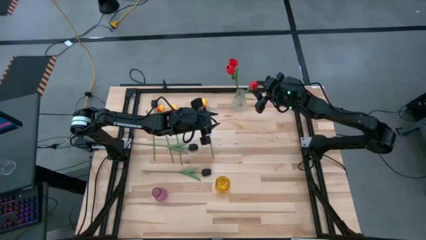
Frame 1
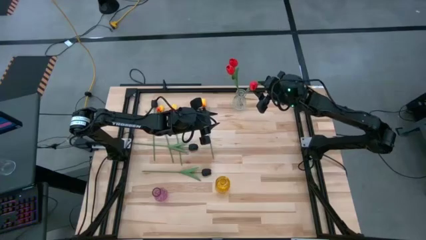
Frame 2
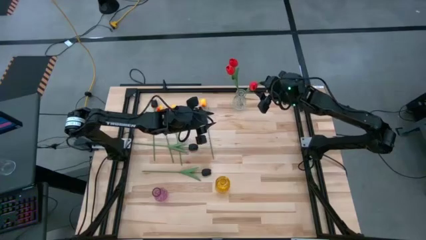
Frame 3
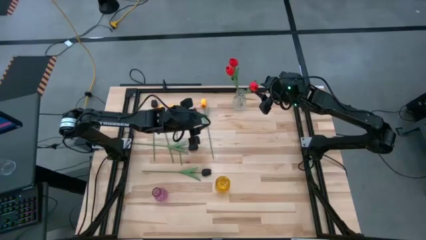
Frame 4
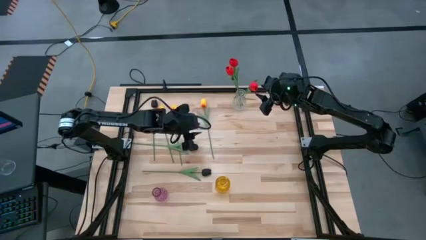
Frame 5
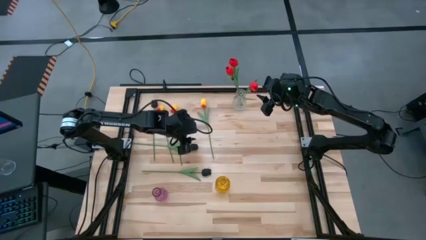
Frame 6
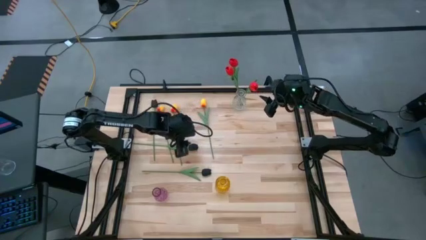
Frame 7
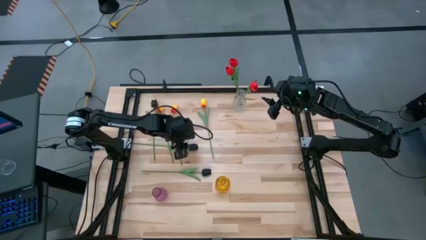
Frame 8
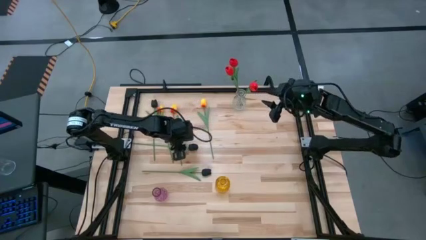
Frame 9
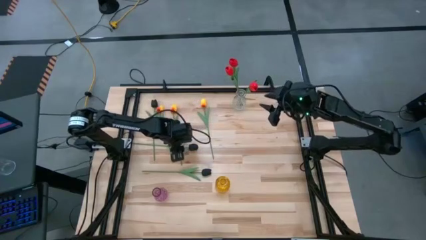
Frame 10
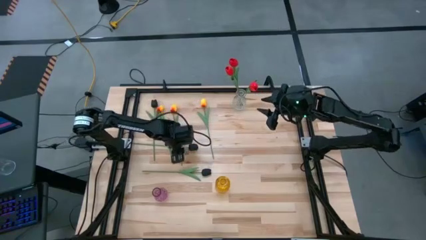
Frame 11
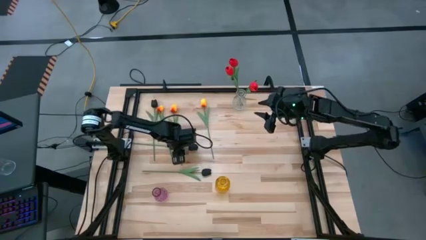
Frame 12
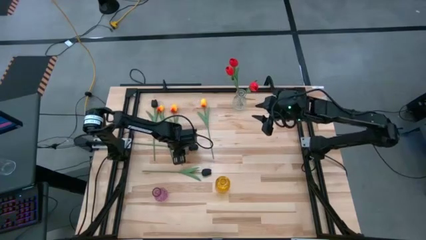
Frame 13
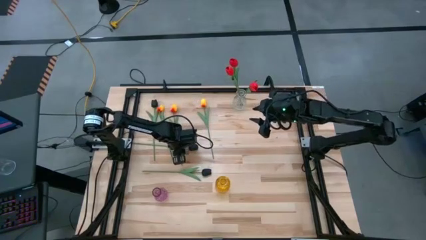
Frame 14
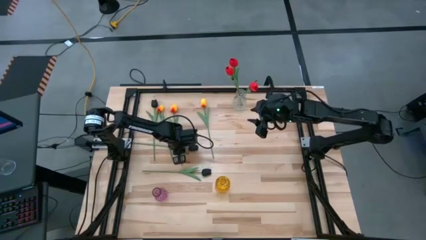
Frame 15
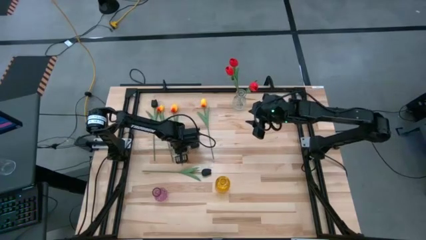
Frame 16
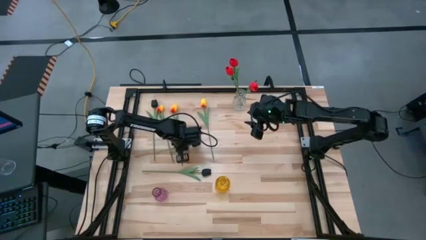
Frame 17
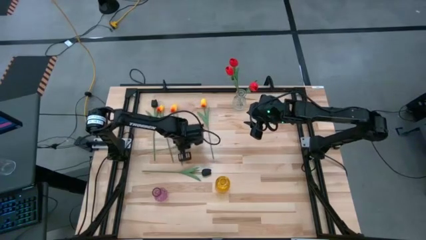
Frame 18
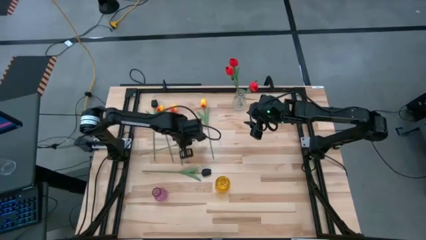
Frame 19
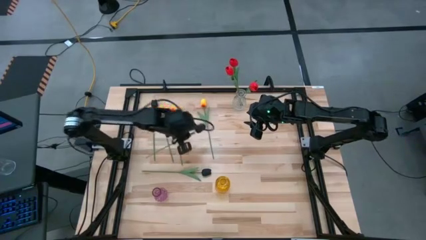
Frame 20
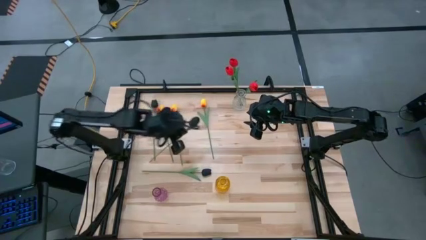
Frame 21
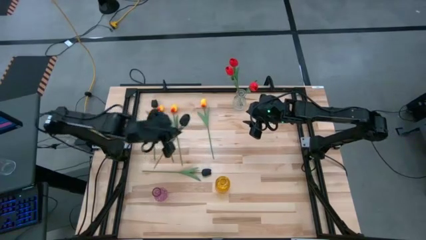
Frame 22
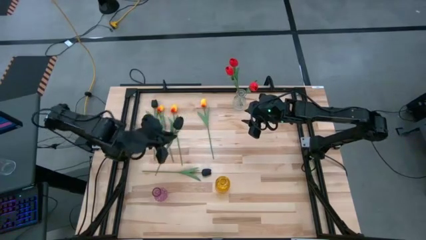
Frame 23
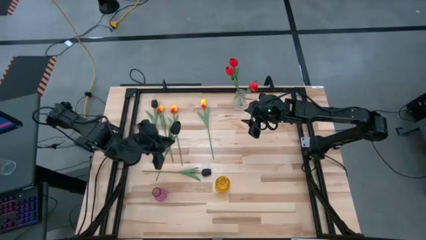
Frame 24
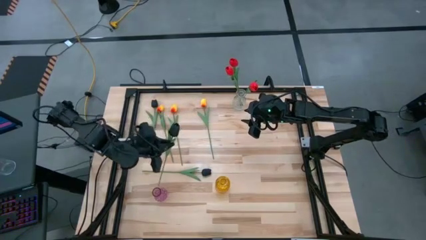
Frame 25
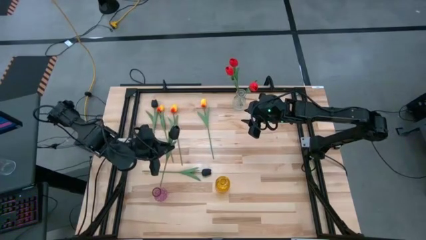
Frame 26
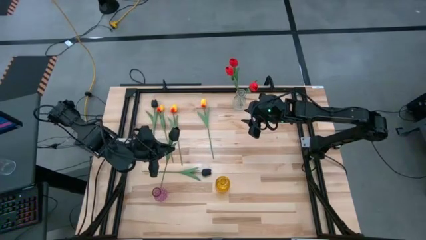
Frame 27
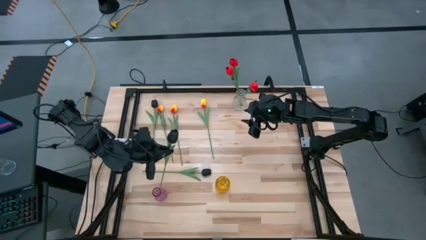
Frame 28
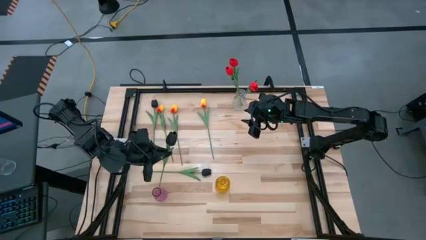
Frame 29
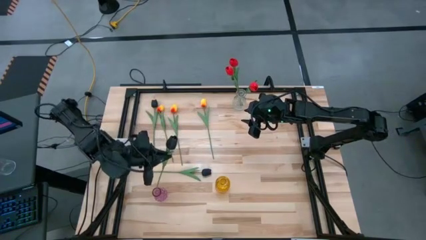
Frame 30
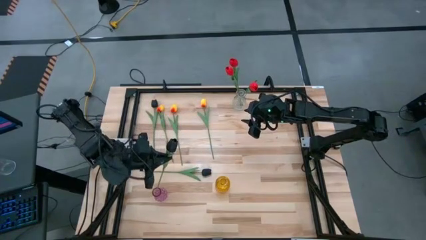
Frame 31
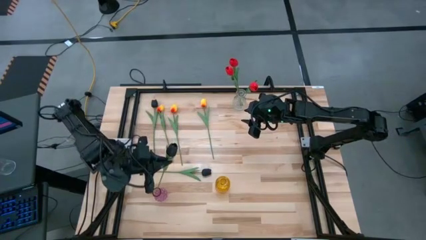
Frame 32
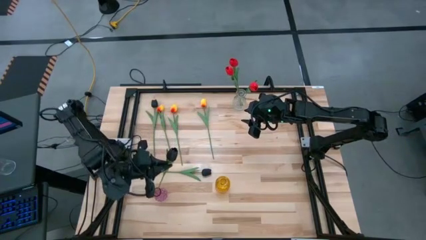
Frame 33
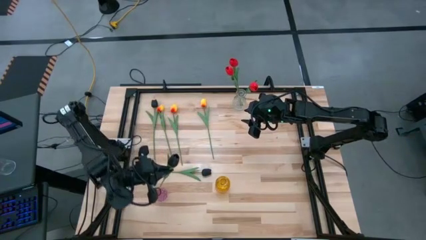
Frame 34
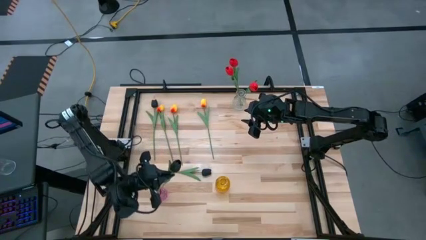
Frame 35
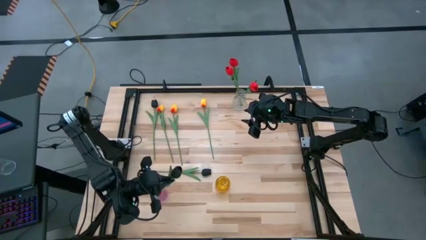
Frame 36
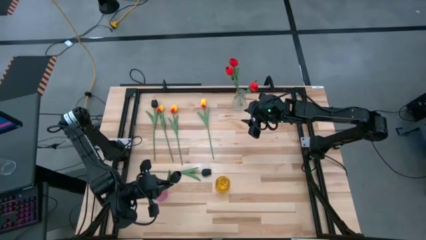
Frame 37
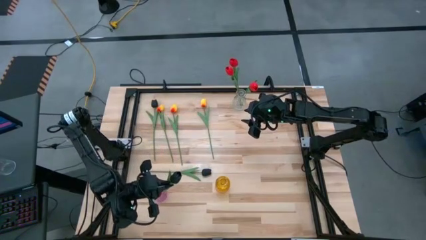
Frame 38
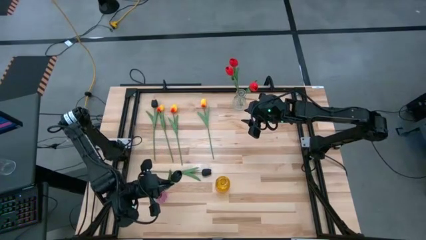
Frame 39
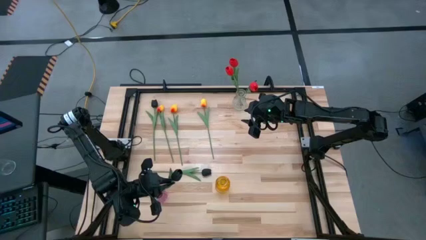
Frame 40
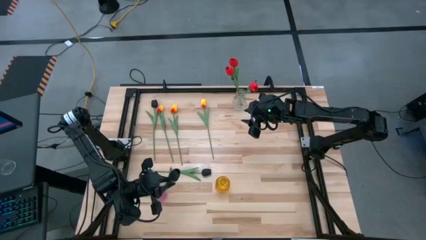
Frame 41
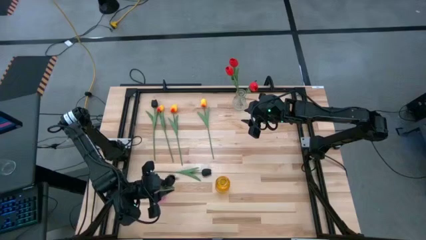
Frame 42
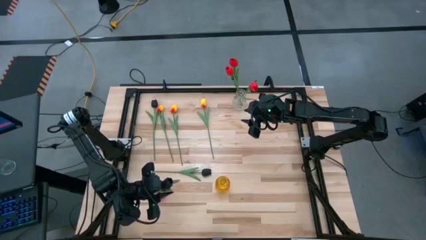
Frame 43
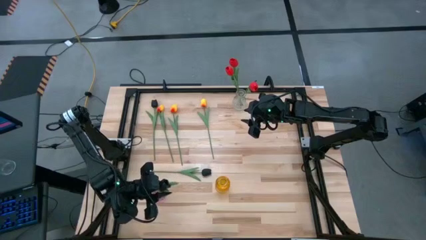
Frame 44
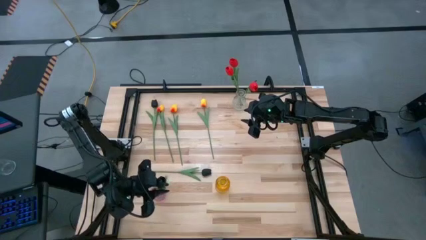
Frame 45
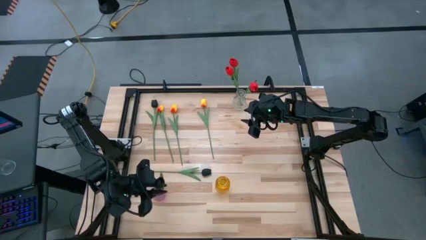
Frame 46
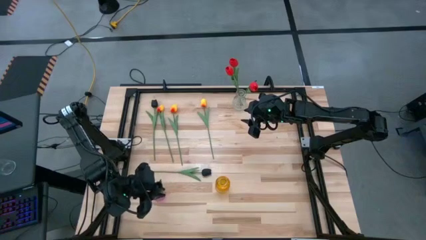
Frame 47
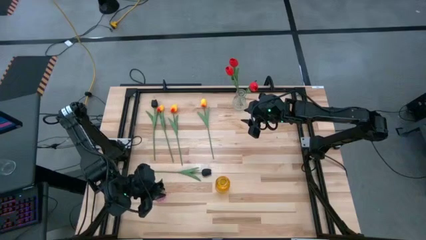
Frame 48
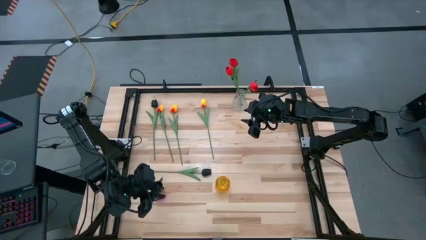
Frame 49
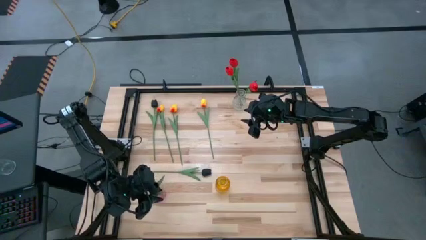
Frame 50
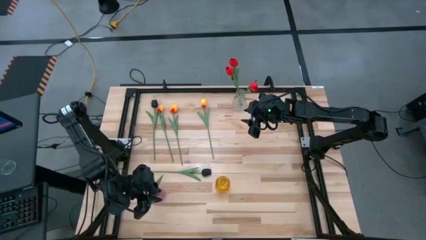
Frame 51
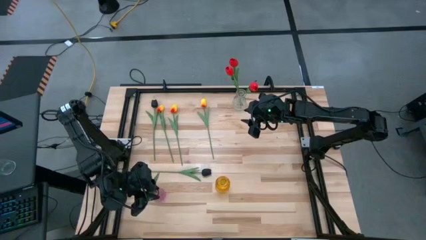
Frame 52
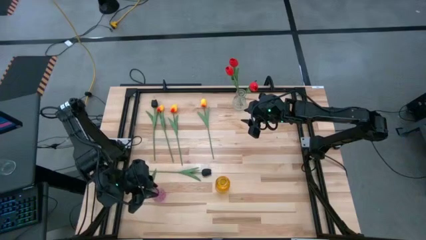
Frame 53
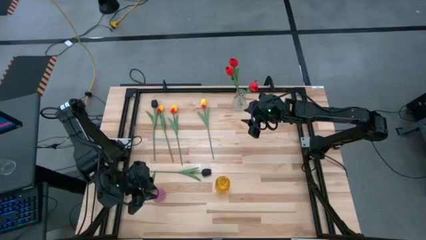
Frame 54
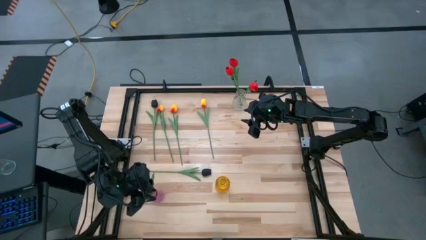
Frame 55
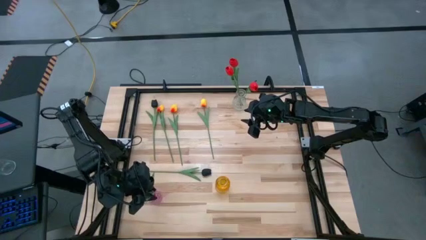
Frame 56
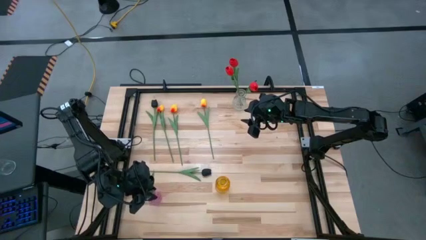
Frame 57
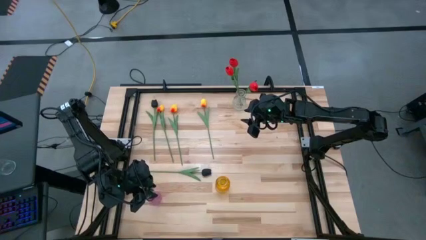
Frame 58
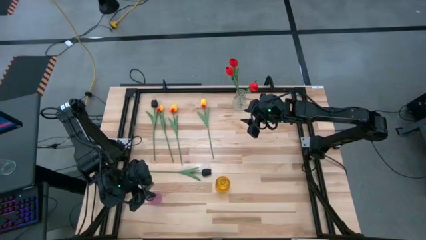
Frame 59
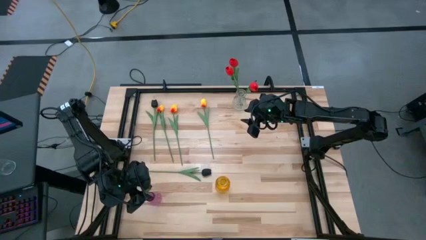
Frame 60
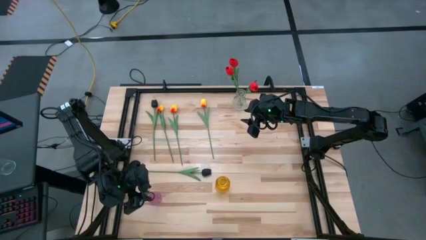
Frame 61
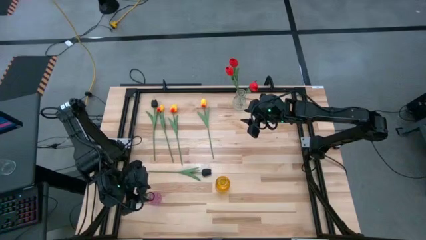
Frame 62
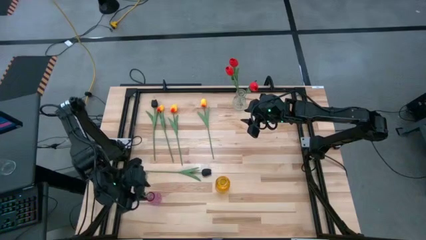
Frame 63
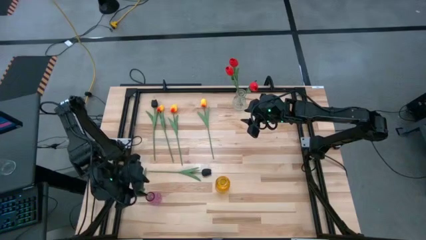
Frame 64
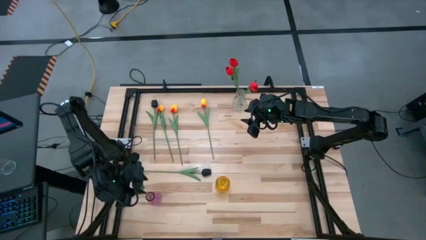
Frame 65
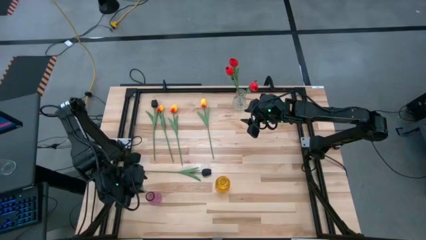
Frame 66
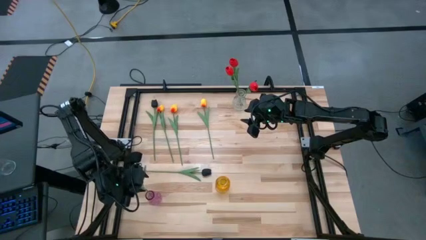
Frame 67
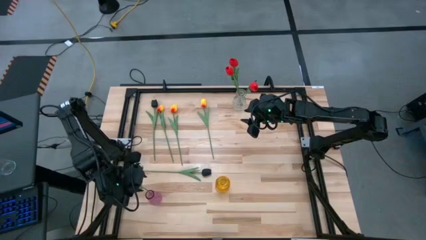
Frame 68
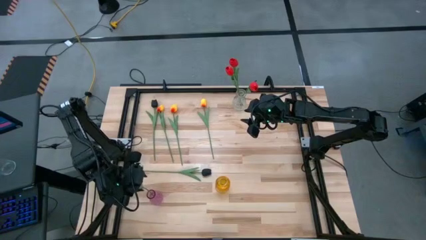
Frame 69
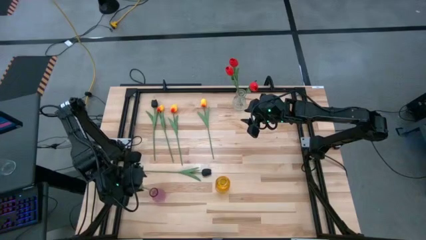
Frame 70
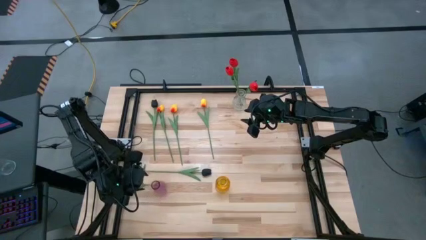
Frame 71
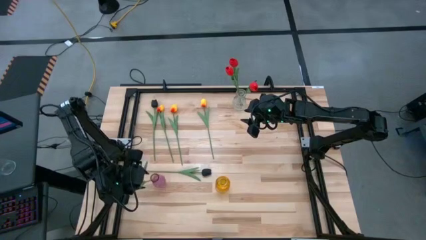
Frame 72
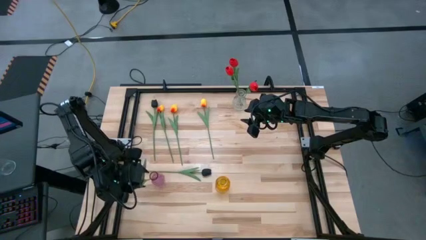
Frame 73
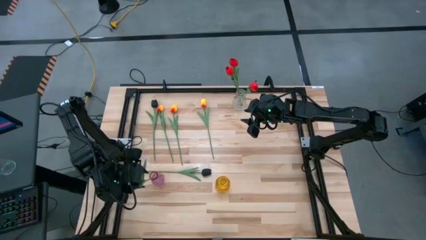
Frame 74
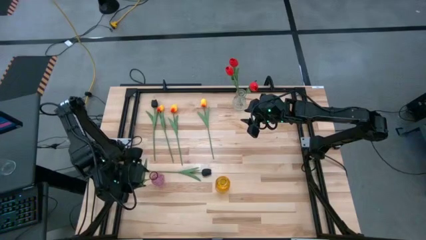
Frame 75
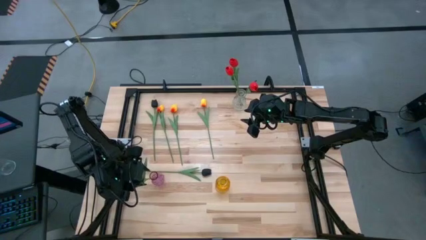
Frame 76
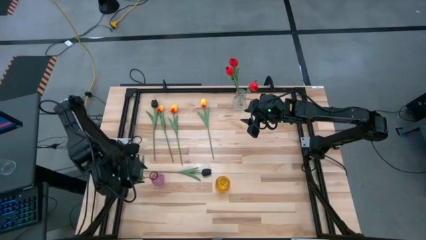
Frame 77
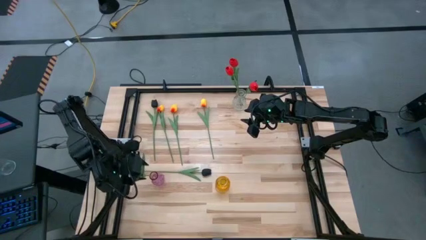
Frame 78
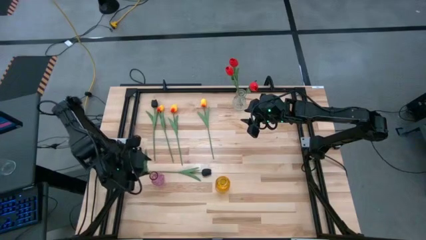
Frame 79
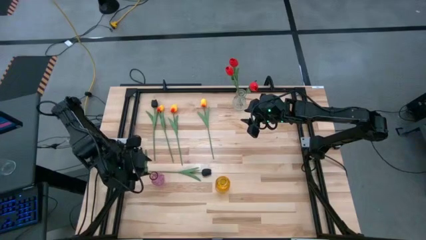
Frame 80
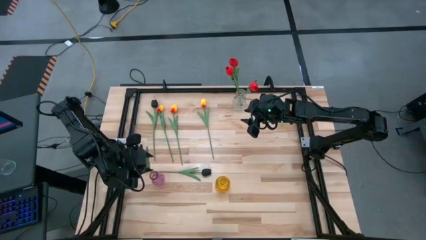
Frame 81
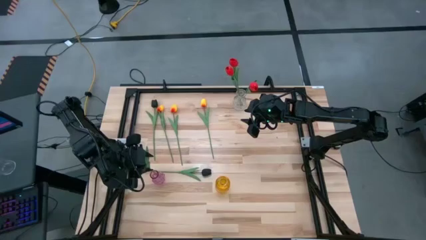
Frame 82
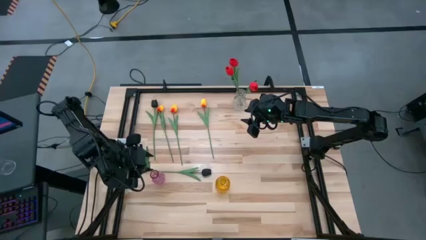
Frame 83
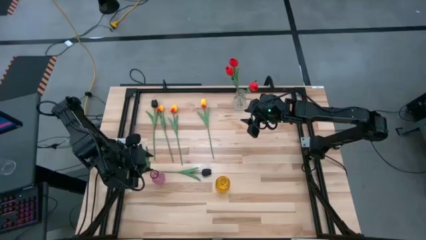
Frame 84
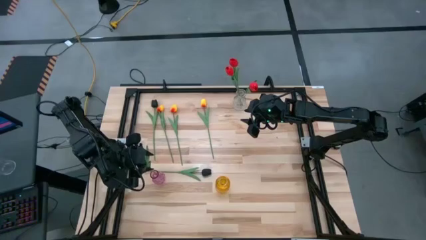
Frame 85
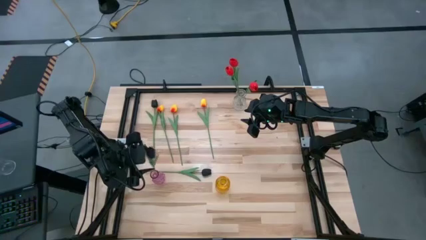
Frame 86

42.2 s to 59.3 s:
Task: Sort flowers into vase by color
Put the middle black flower into the purple vase
